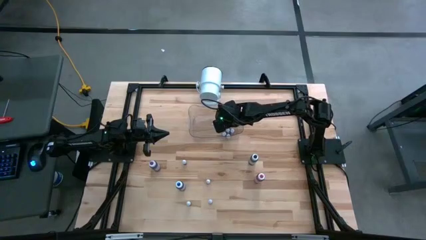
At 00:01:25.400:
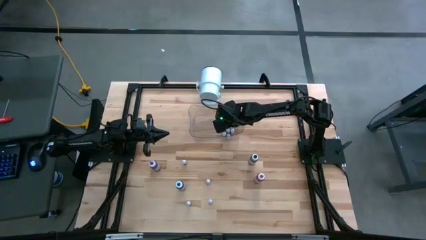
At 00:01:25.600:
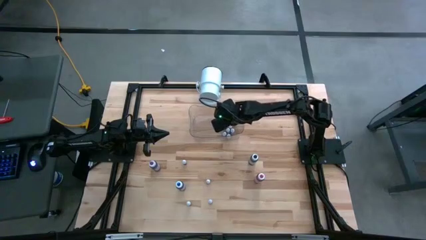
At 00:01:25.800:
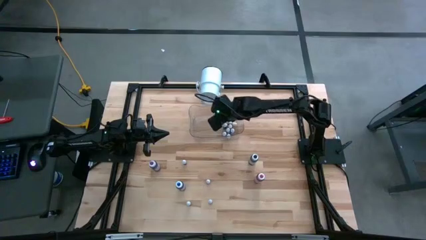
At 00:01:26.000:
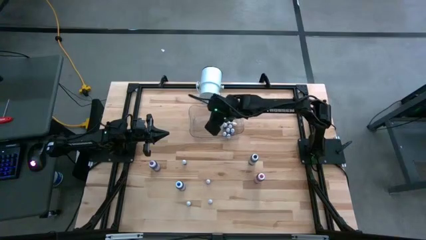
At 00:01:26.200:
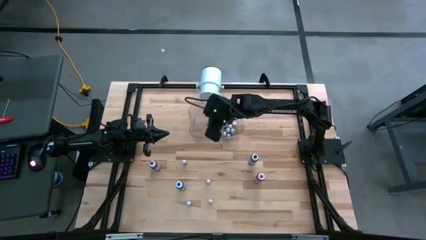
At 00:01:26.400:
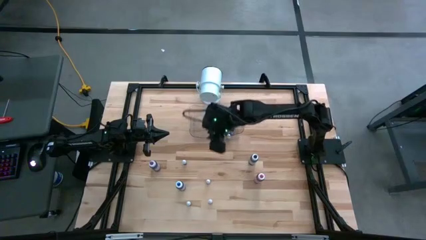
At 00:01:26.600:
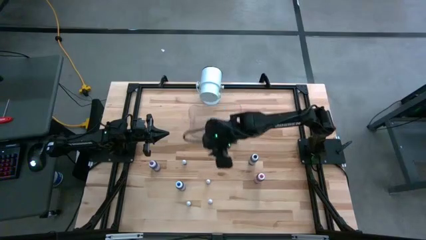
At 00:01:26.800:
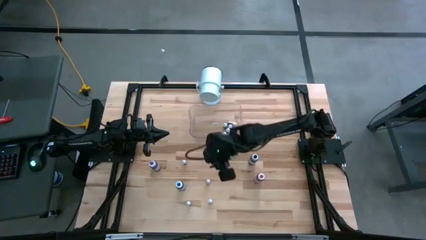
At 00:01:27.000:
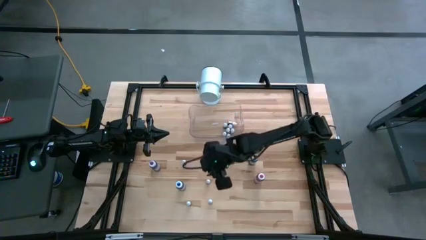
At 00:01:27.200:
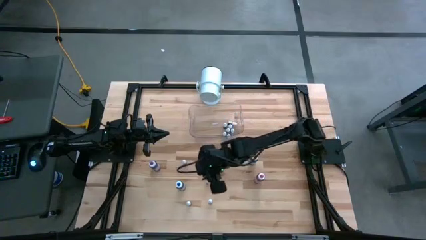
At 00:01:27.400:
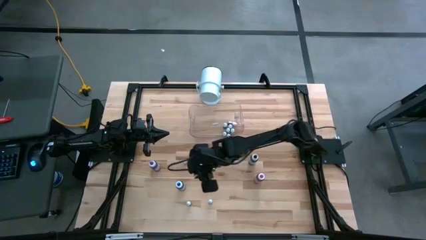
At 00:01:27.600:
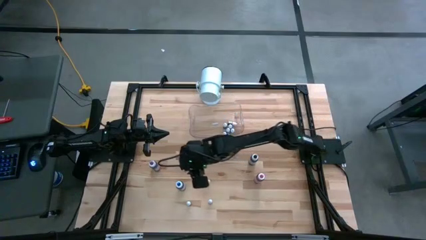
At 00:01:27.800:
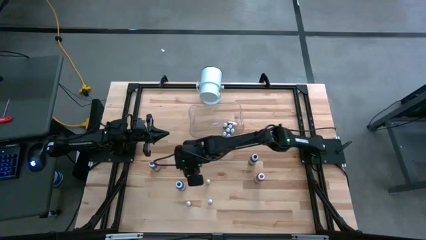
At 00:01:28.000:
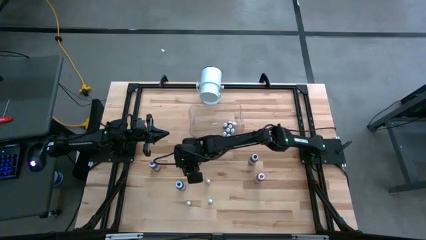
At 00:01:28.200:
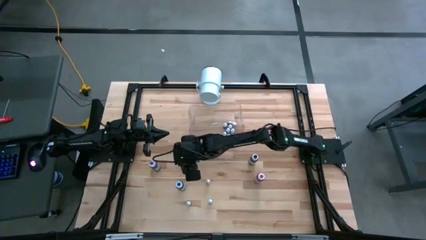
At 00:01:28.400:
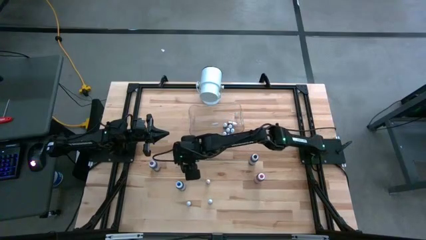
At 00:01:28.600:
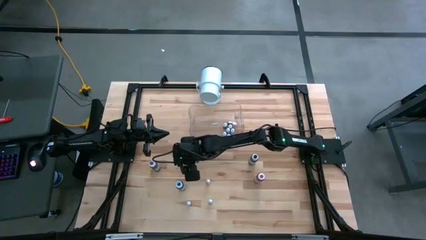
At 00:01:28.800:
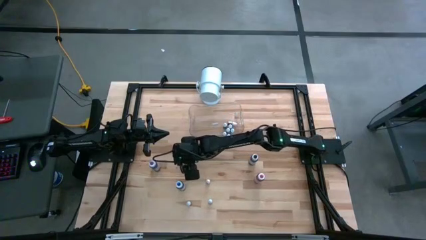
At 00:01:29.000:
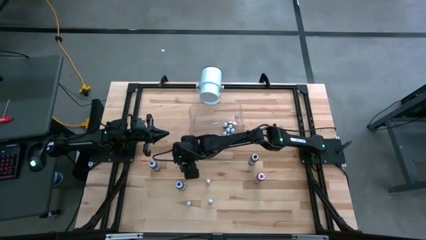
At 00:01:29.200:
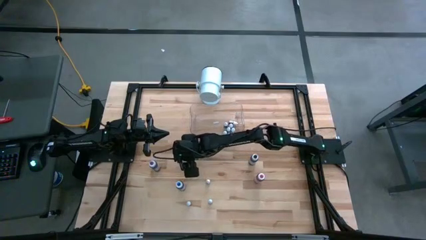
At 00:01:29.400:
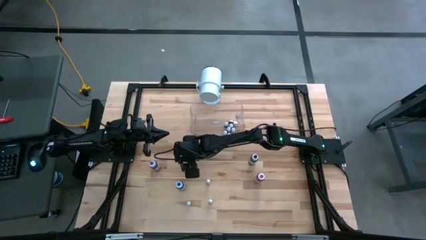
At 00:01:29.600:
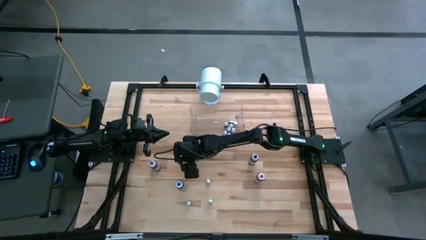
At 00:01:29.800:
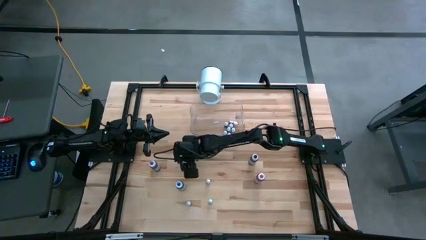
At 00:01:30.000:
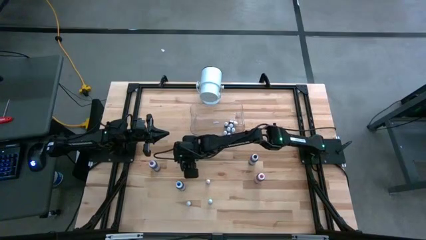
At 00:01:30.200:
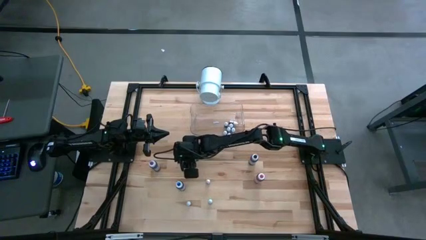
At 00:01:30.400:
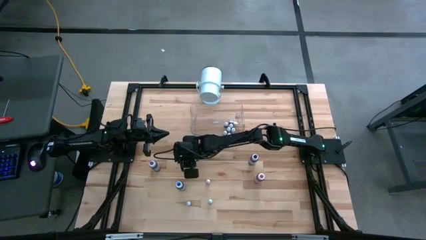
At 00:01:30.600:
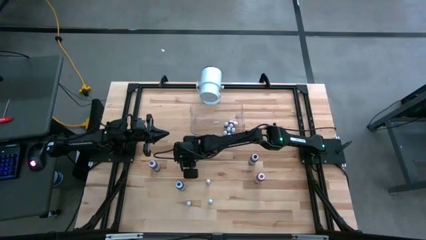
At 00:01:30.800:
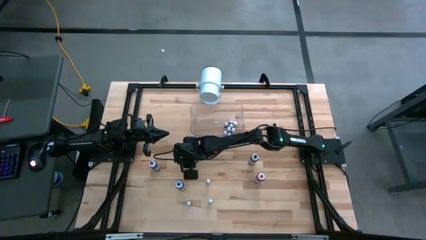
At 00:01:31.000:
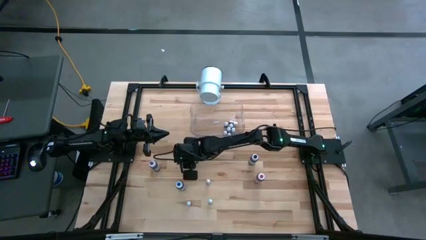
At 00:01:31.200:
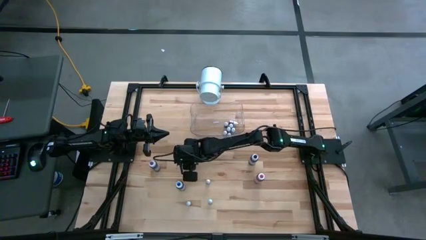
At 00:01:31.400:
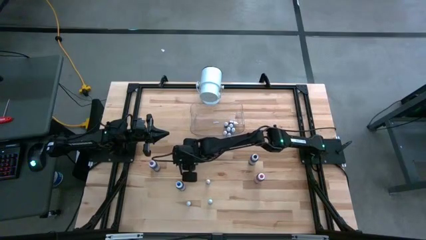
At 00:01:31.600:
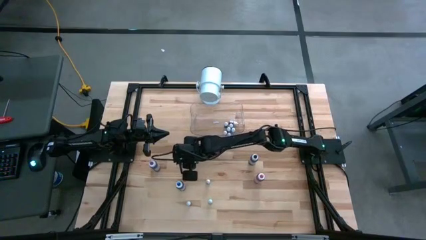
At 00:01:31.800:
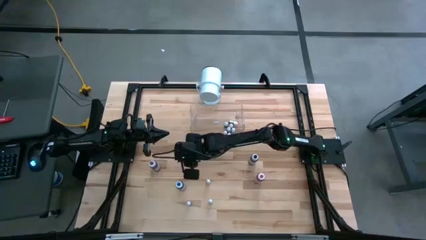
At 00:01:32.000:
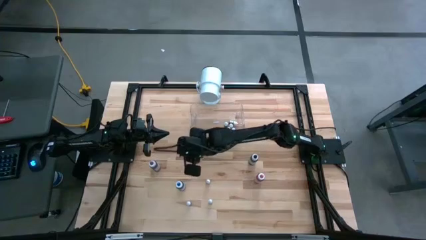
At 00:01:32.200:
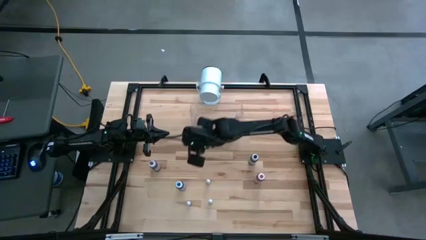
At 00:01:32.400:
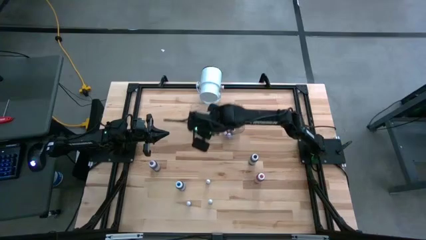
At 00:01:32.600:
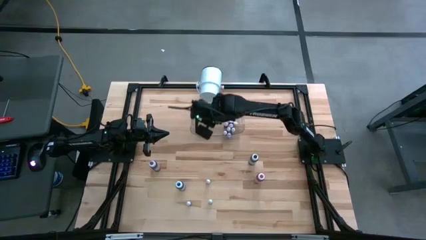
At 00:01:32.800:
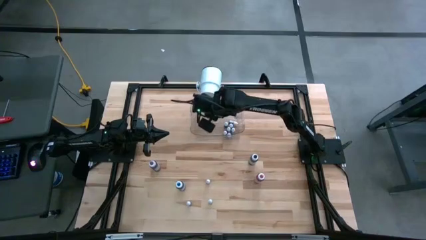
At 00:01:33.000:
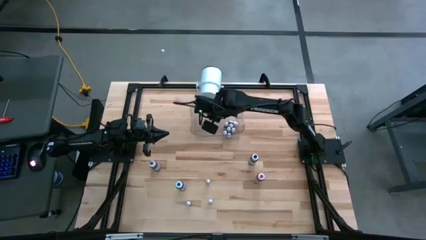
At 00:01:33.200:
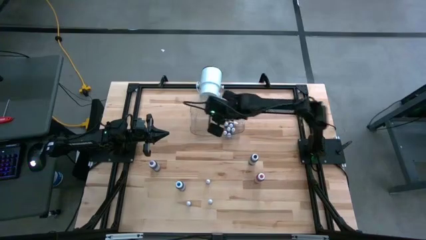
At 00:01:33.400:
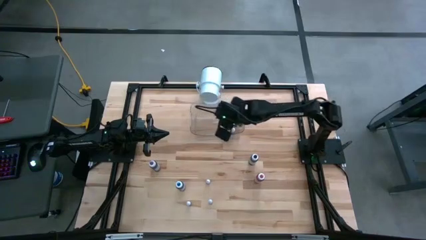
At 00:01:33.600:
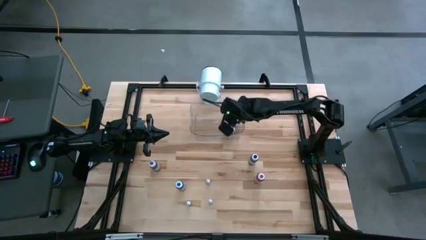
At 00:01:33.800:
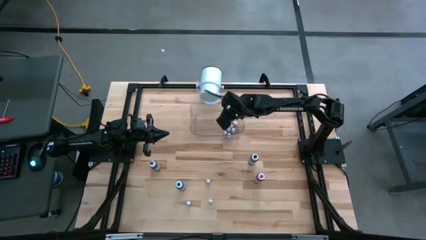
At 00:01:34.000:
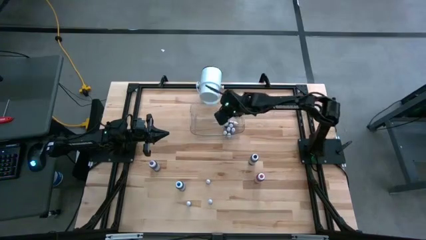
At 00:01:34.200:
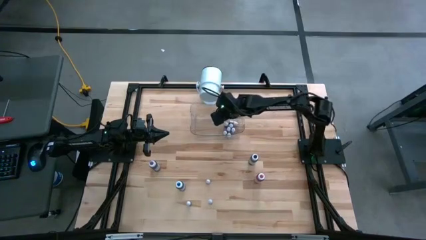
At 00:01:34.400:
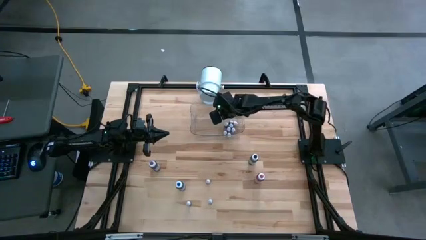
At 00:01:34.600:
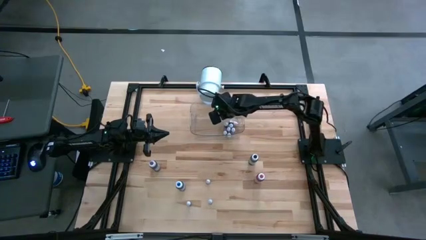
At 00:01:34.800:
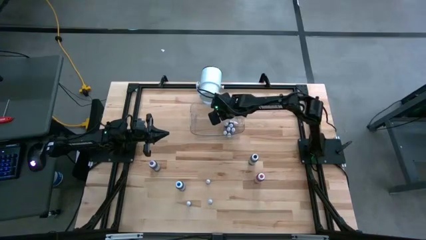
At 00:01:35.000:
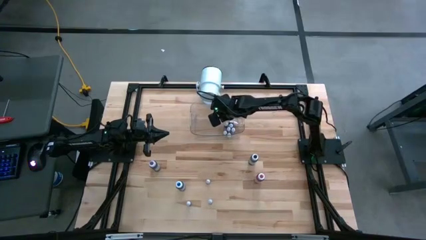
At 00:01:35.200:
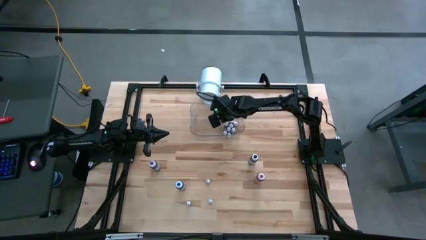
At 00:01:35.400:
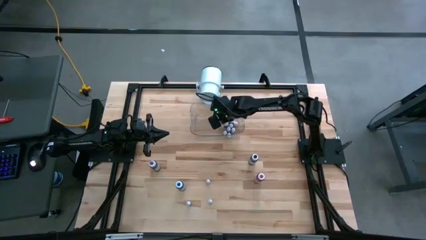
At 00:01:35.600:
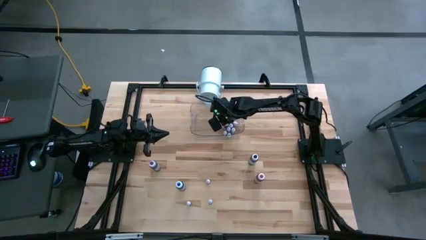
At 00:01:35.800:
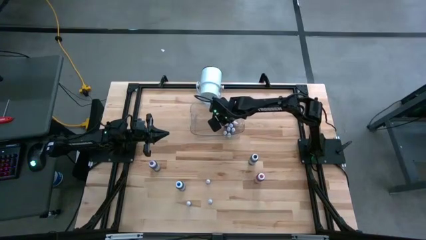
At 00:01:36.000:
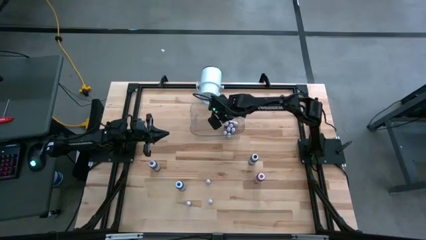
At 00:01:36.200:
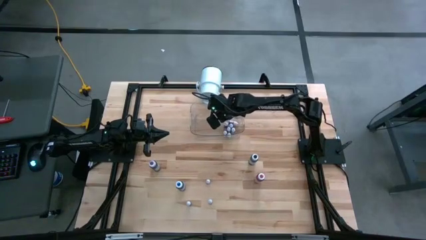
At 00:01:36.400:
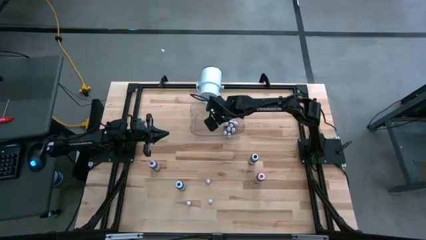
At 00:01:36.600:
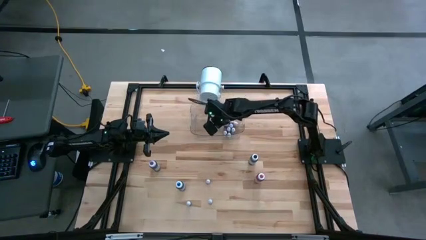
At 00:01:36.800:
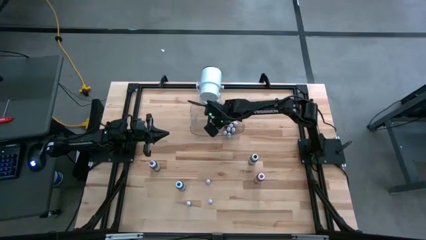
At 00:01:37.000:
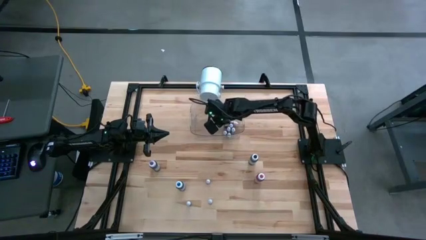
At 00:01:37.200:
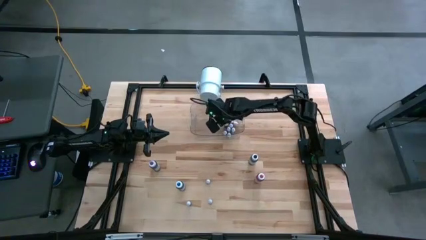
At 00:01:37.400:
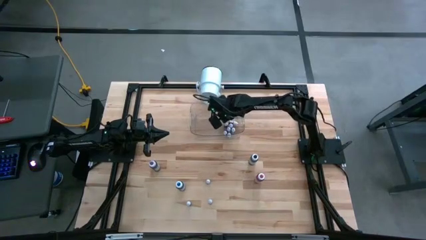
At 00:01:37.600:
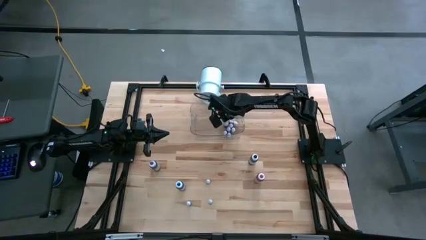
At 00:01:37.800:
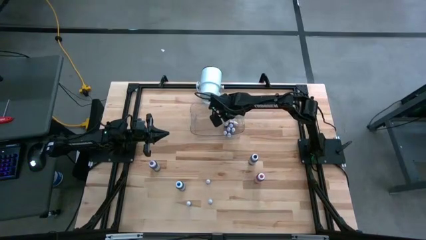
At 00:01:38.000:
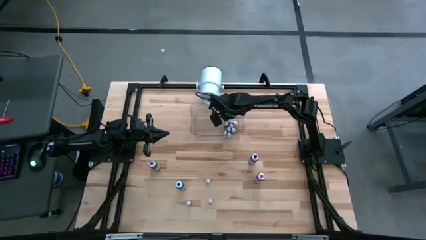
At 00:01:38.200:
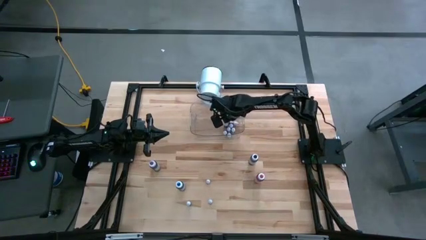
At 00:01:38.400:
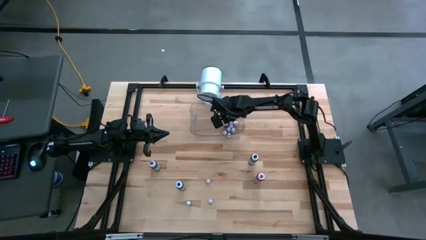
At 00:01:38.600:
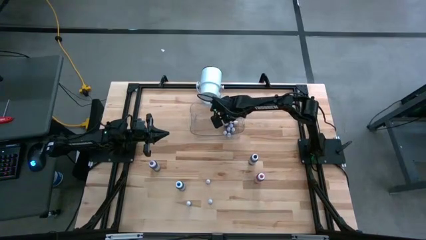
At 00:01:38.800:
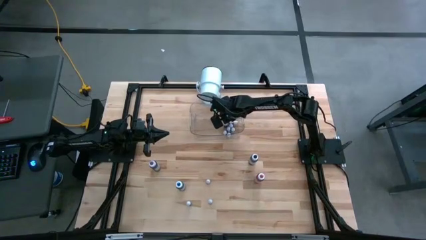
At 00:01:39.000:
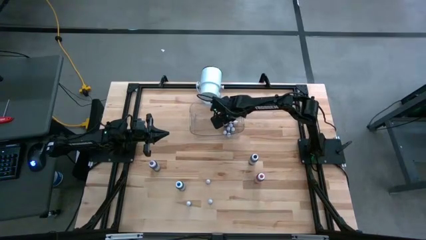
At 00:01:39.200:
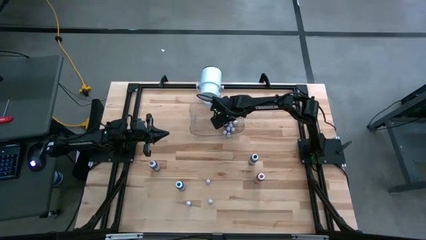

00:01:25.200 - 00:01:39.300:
Task: Pick & Place food coloring
Put the small purple food coloring bottle into the transparent bin
